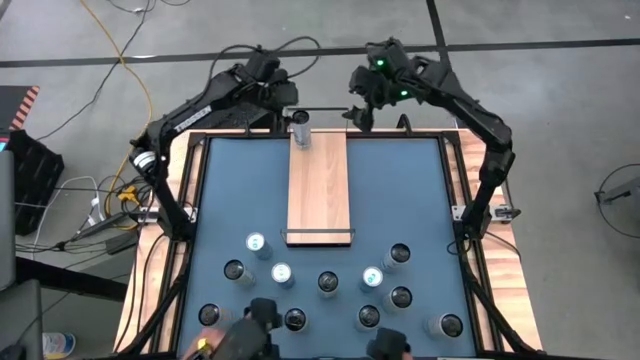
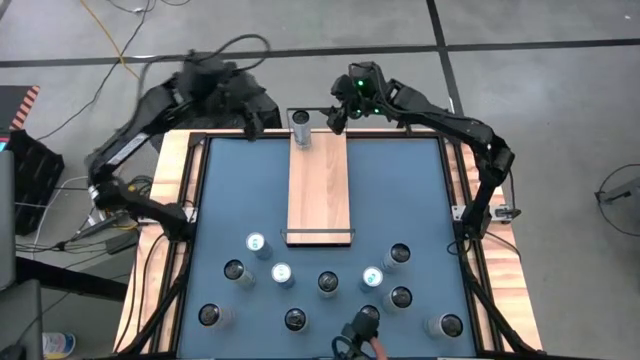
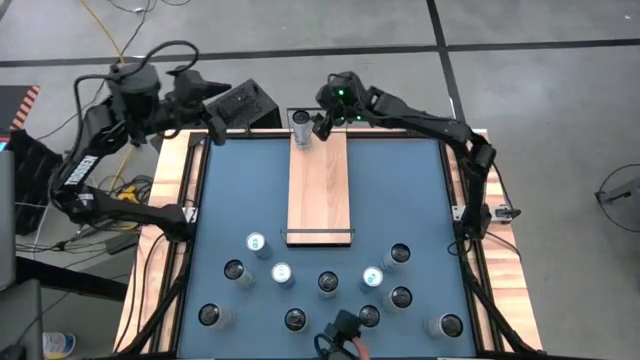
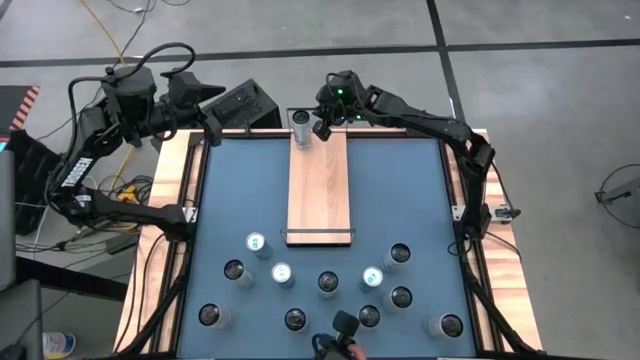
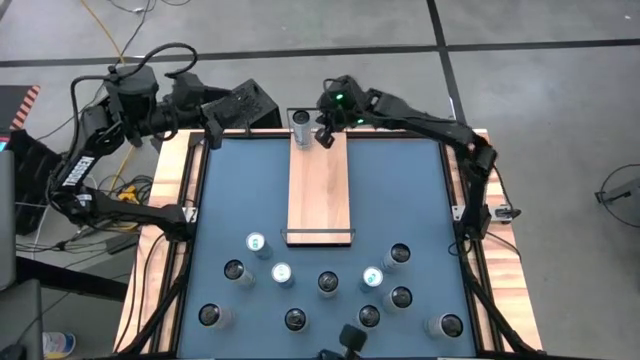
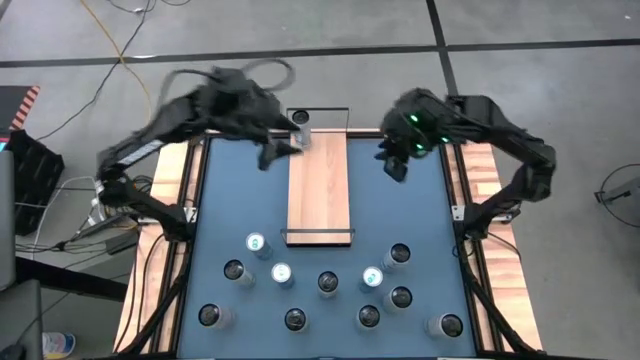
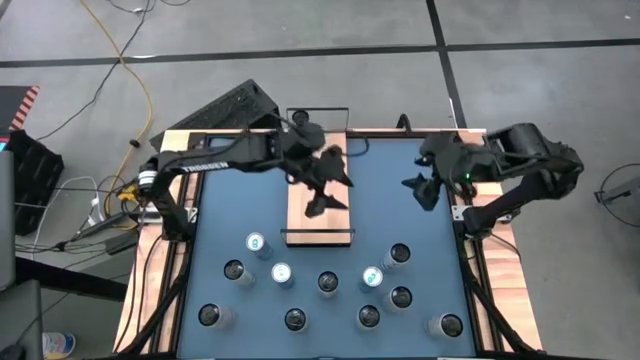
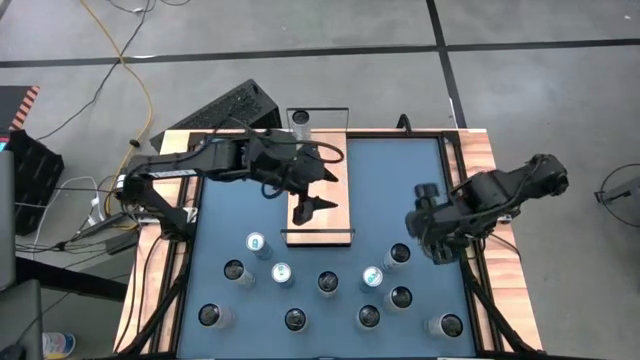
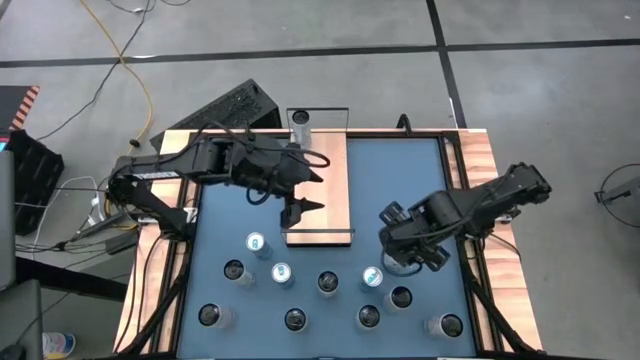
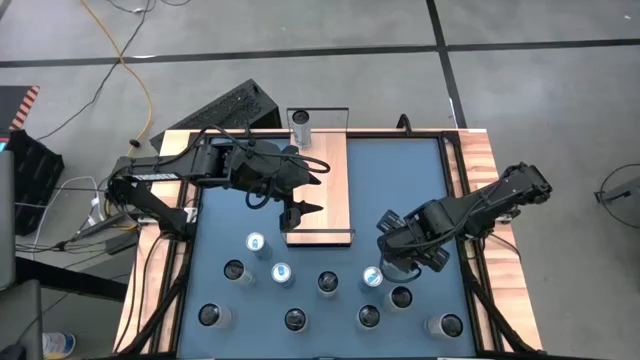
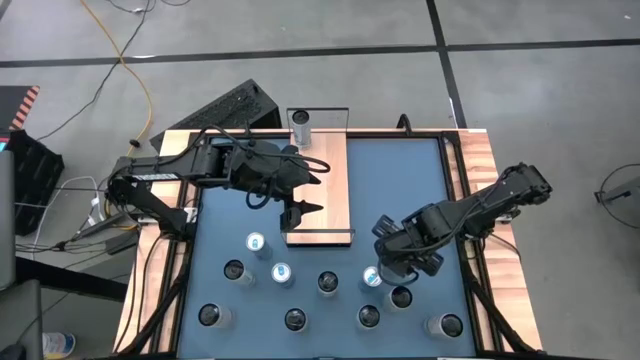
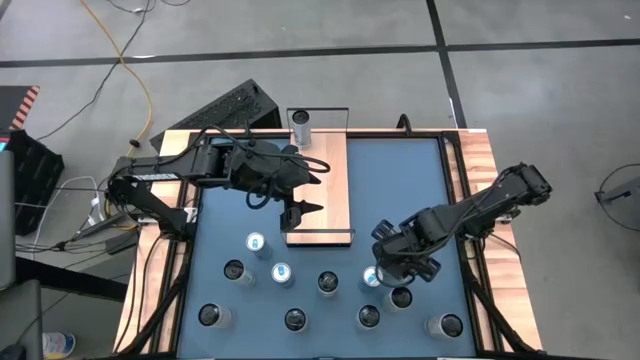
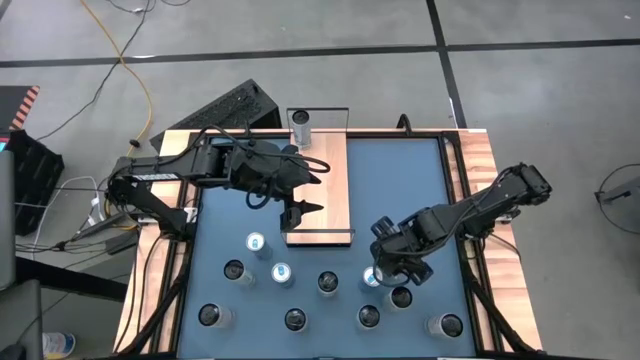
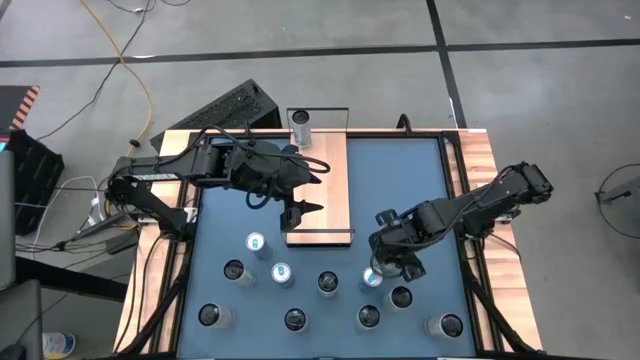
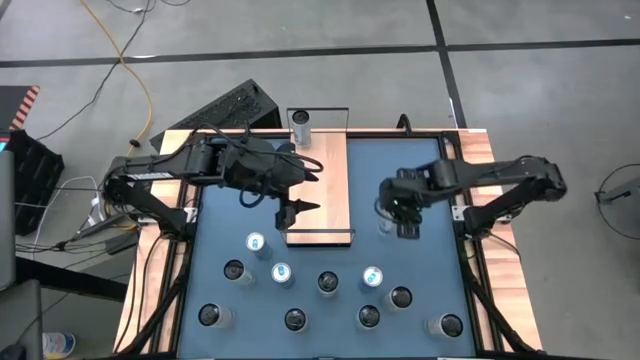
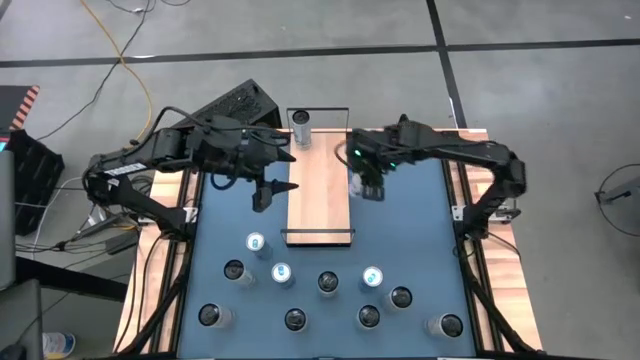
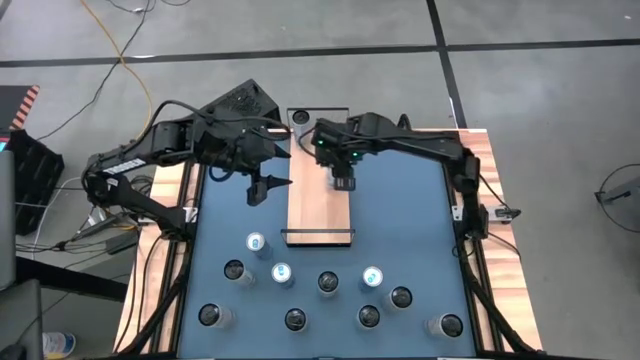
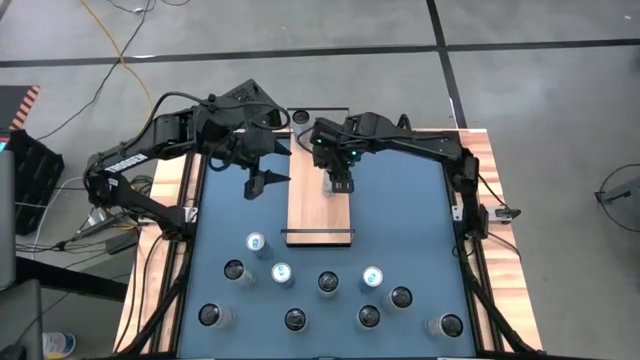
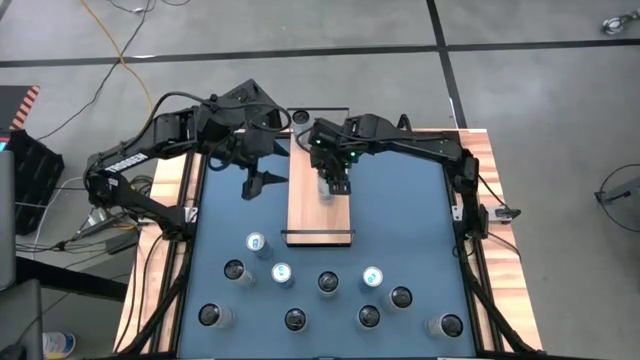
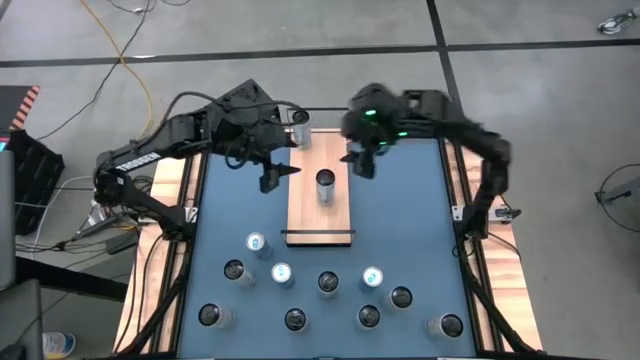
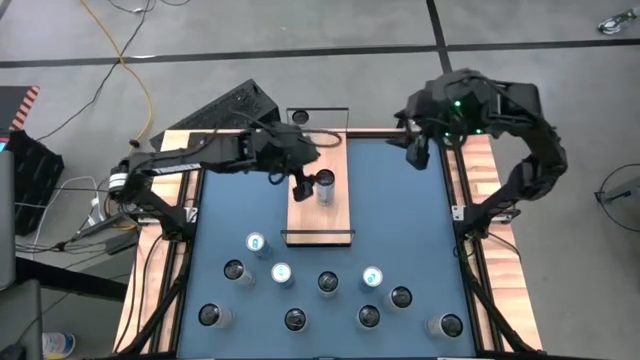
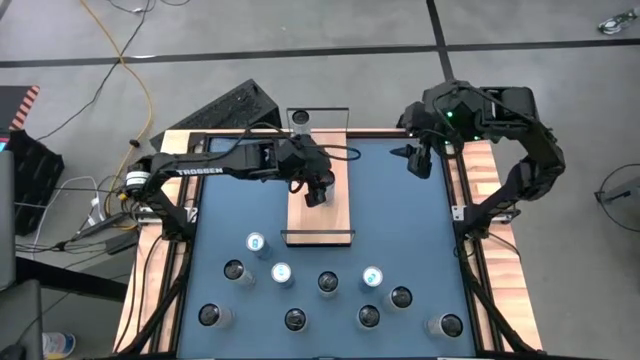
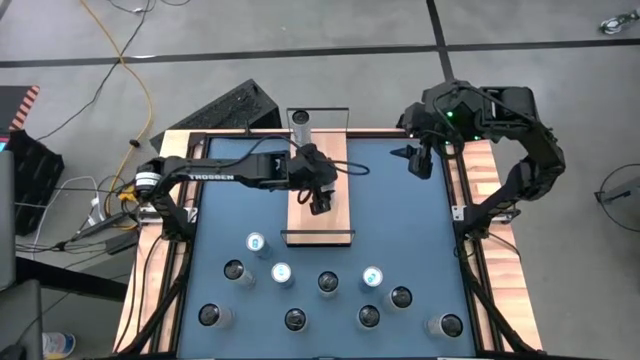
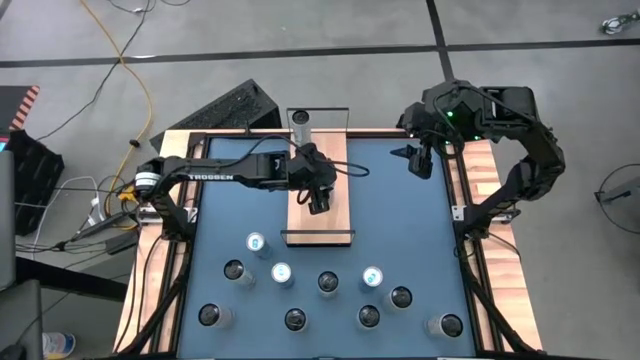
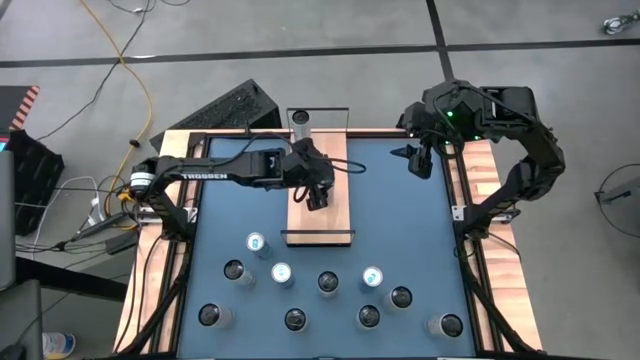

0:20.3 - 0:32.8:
Task: Place canned beverage on shelf
Put the top white-blue soda can on the shelf

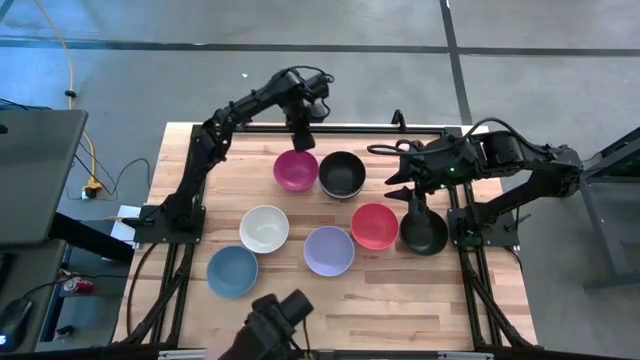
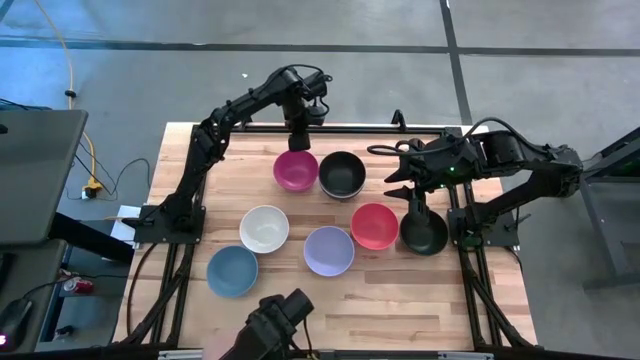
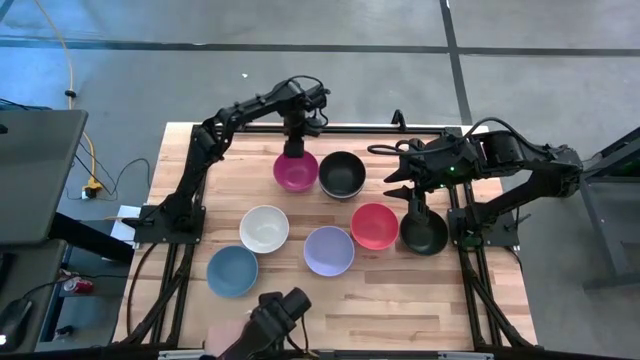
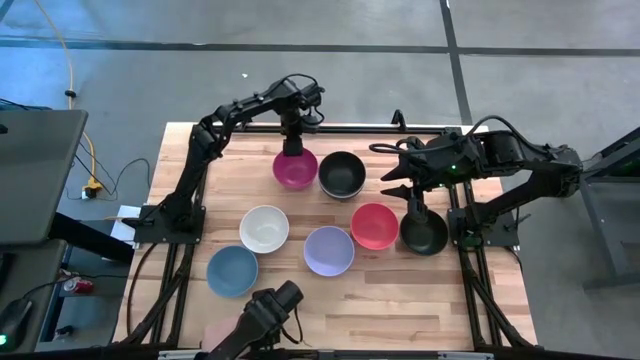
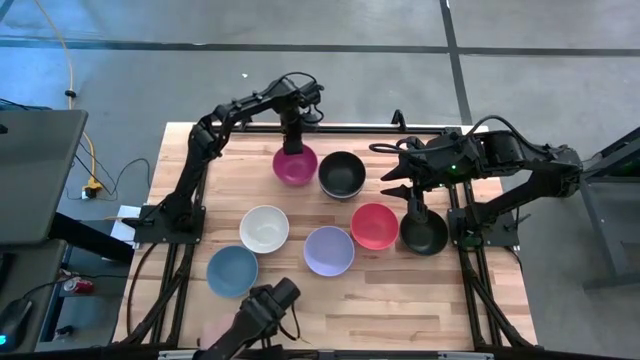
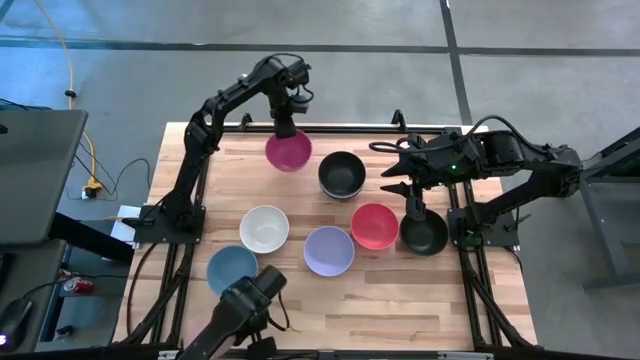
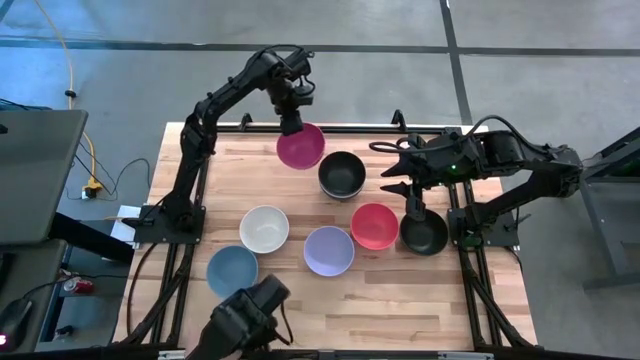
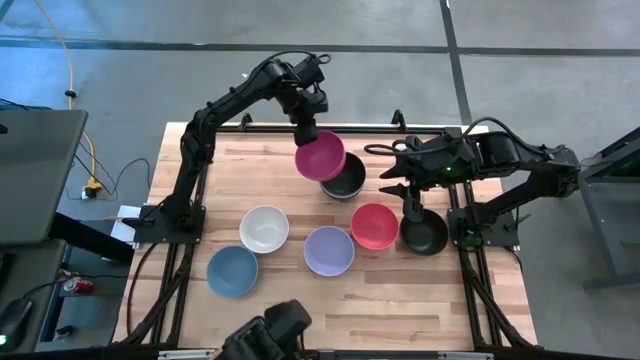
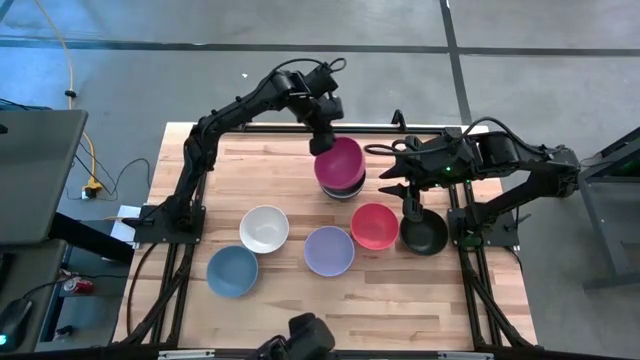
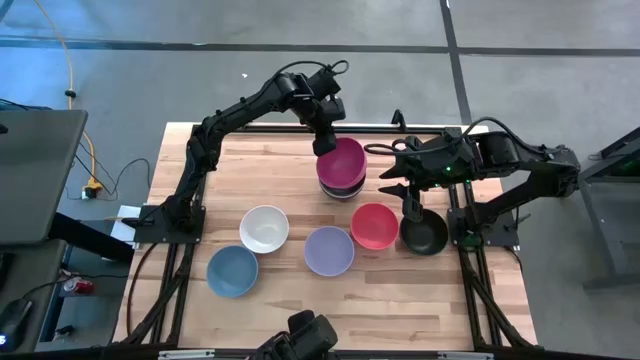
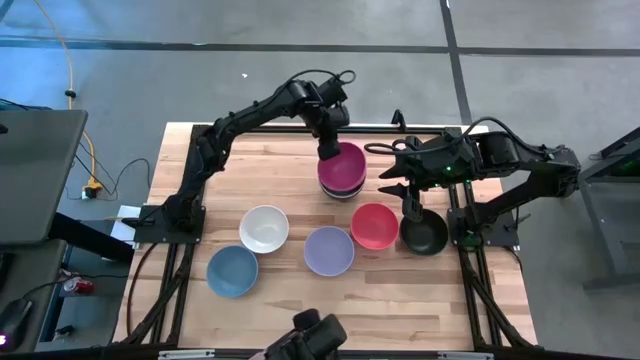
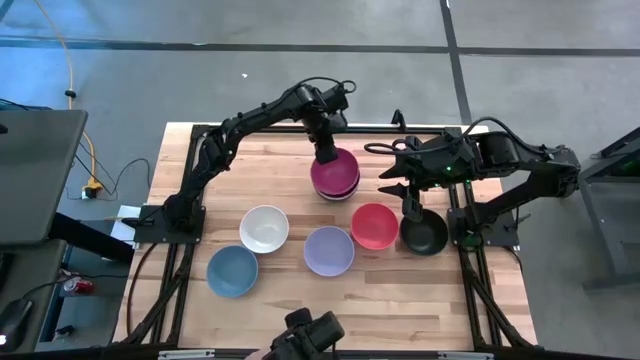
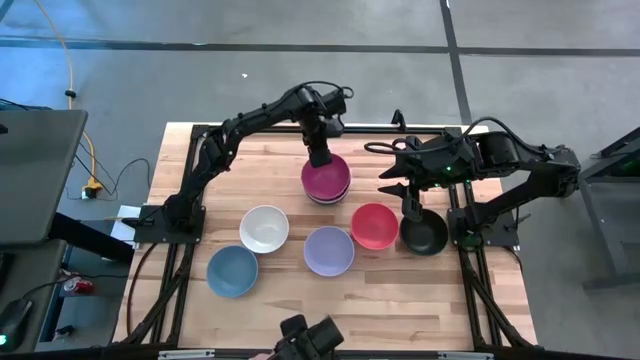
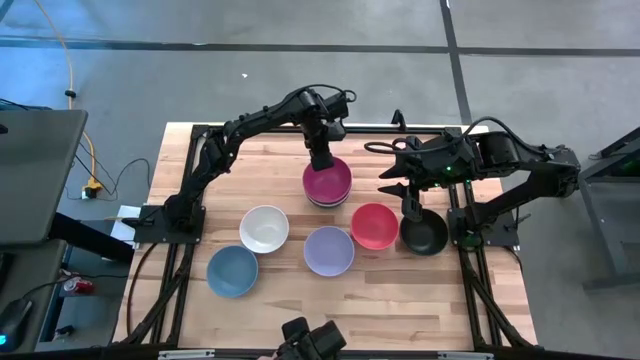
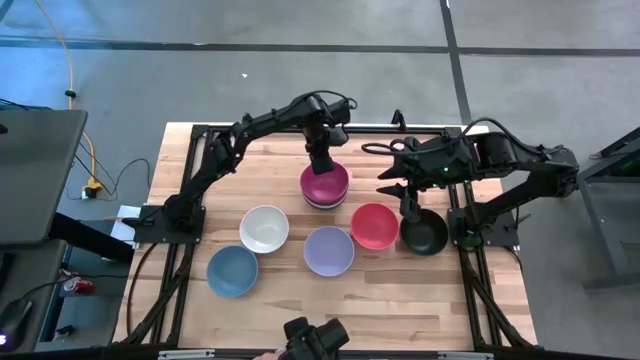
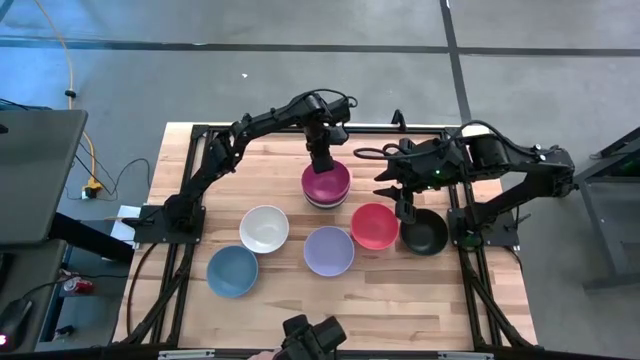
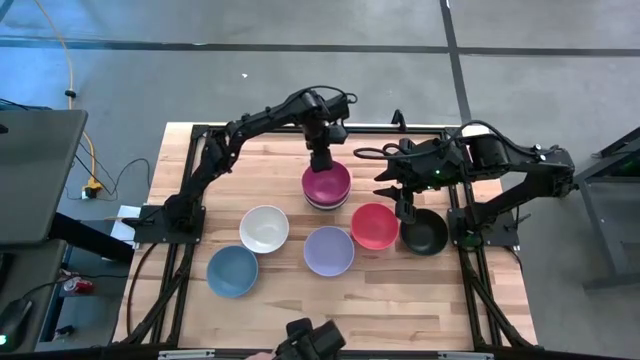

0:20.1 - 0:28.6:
Task: Nest bowls inside each other
Stack the pink bowl on top of the black bowl

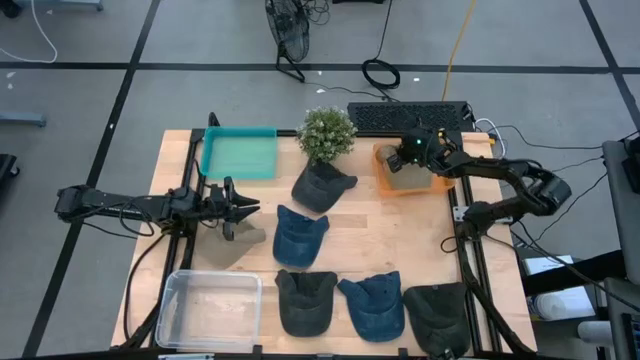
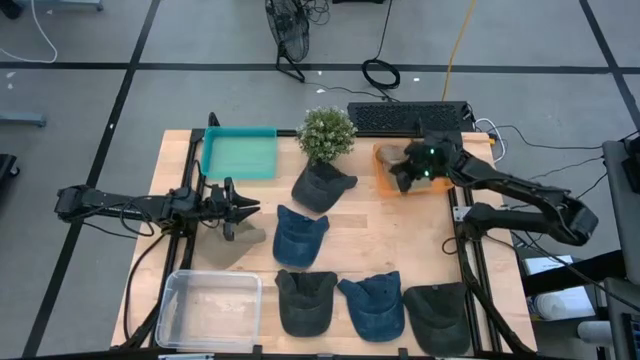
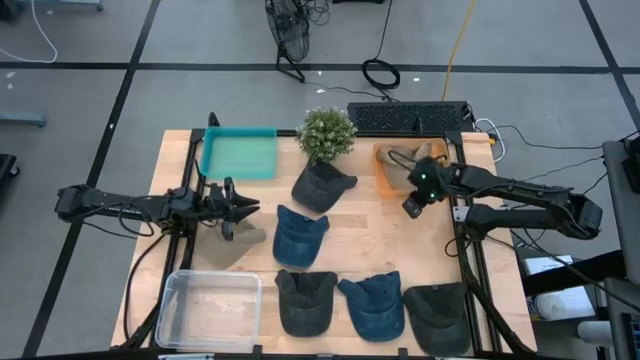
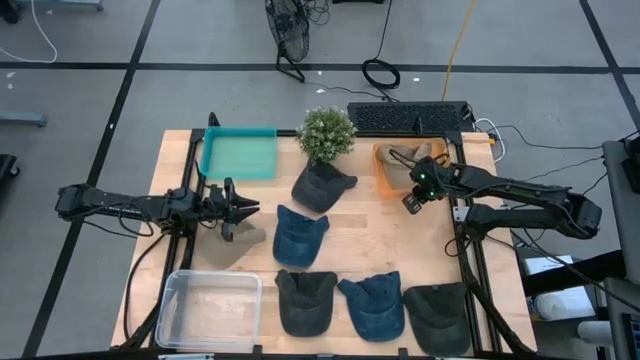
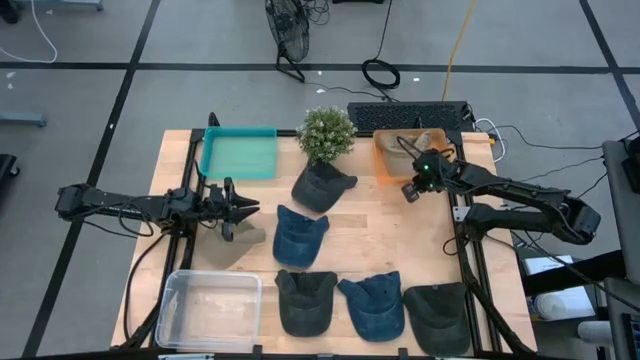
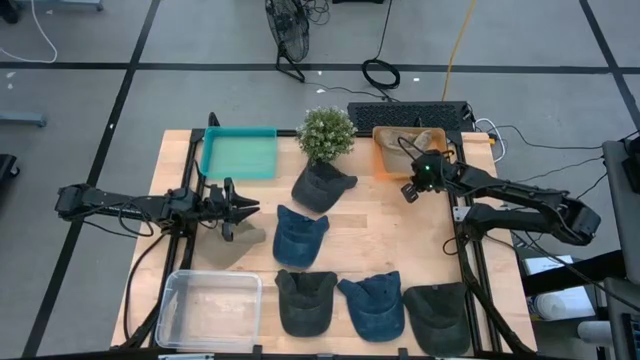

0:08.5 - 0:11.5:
Task: Pick & Place hat
Adjust the orange bin
